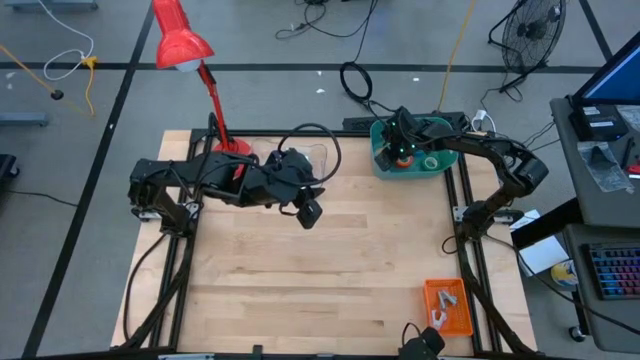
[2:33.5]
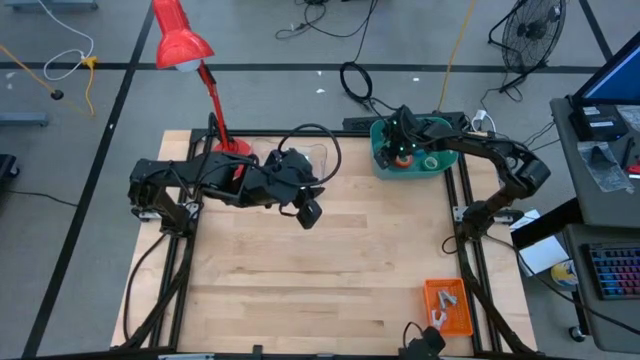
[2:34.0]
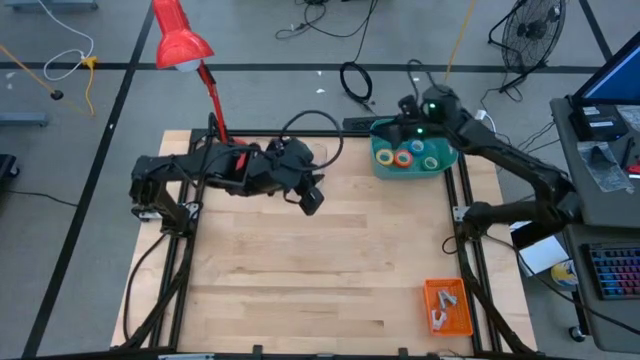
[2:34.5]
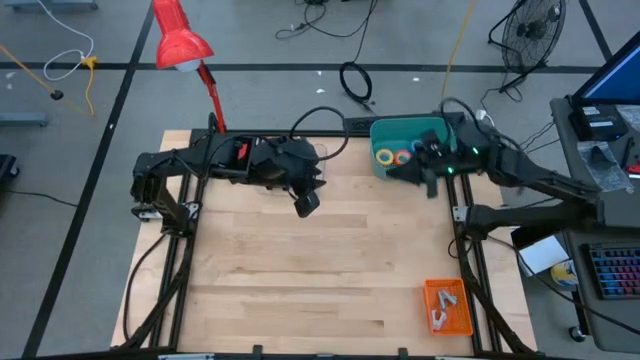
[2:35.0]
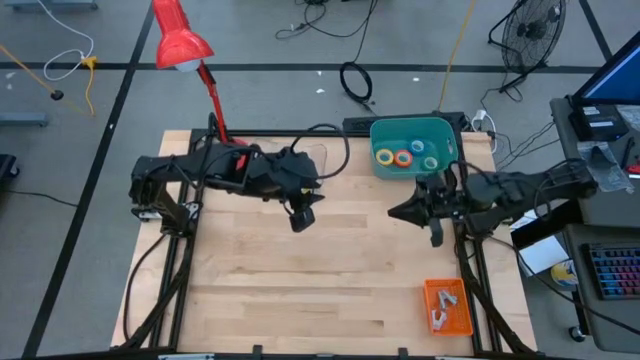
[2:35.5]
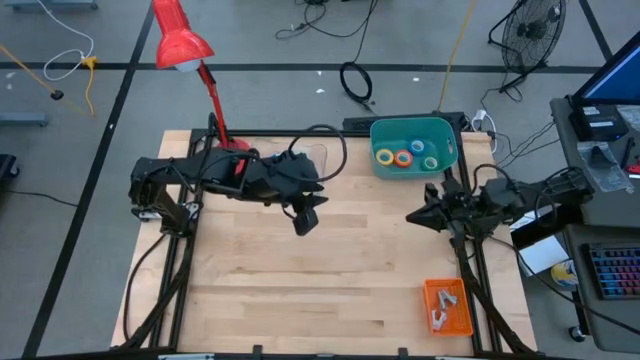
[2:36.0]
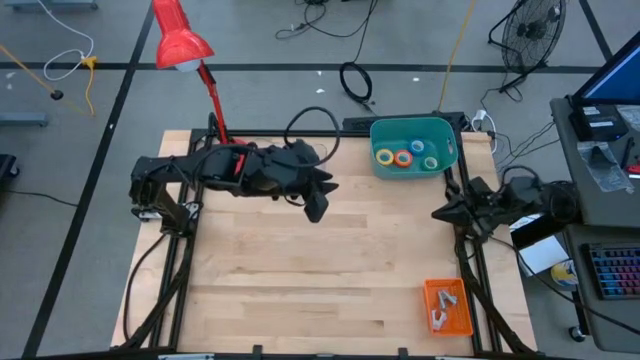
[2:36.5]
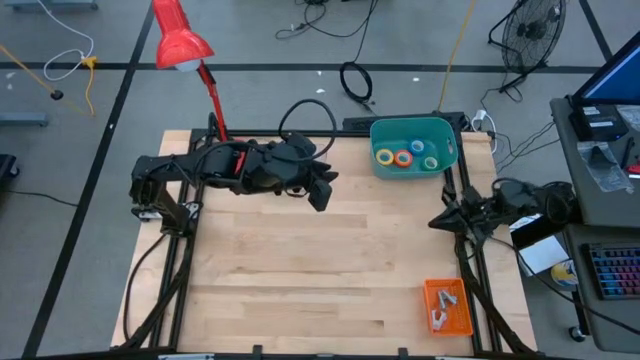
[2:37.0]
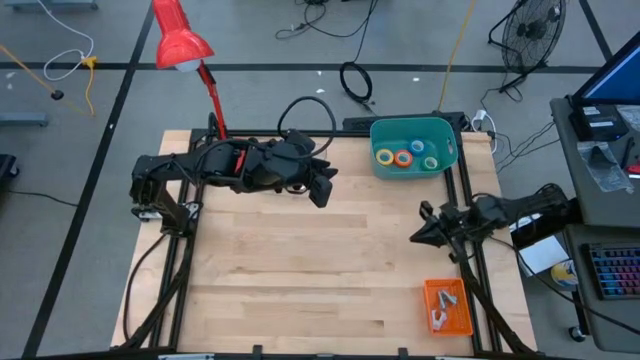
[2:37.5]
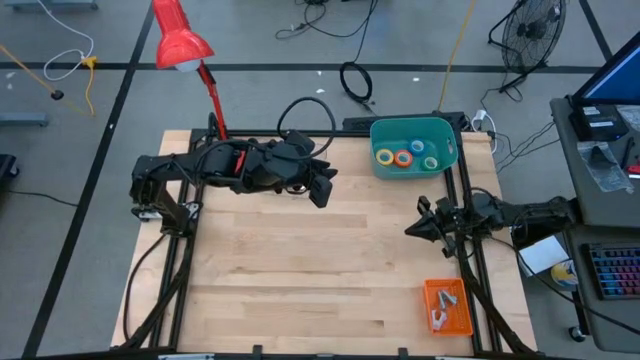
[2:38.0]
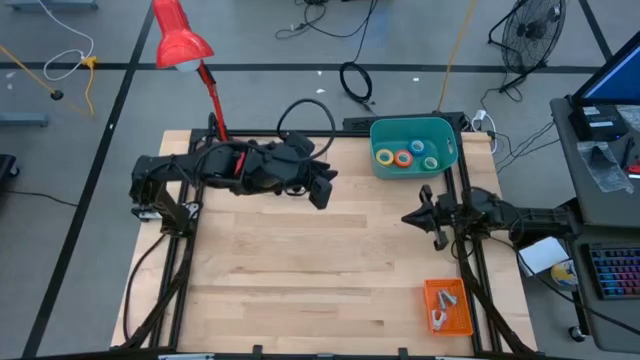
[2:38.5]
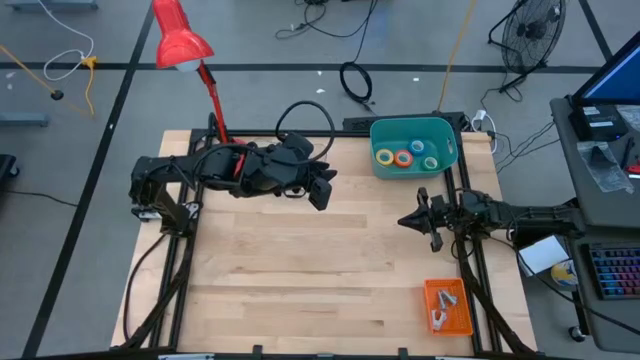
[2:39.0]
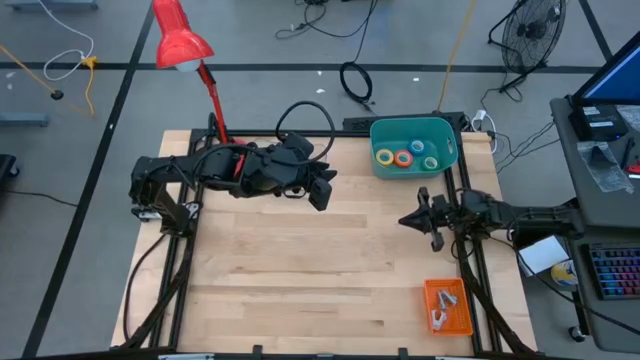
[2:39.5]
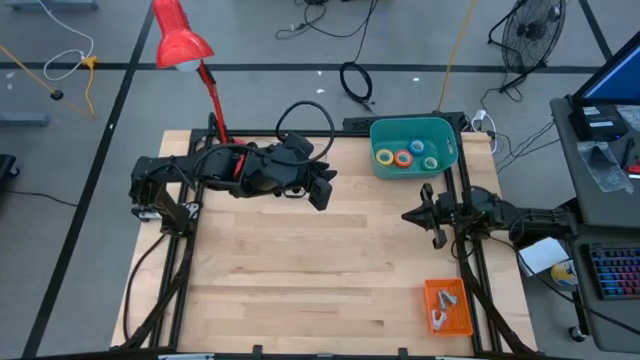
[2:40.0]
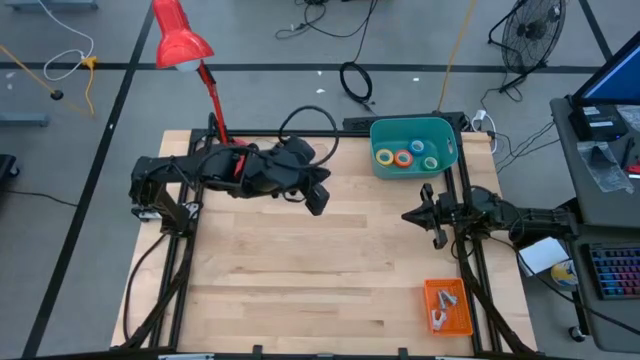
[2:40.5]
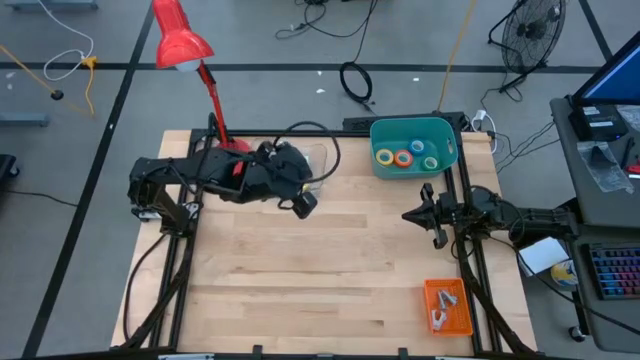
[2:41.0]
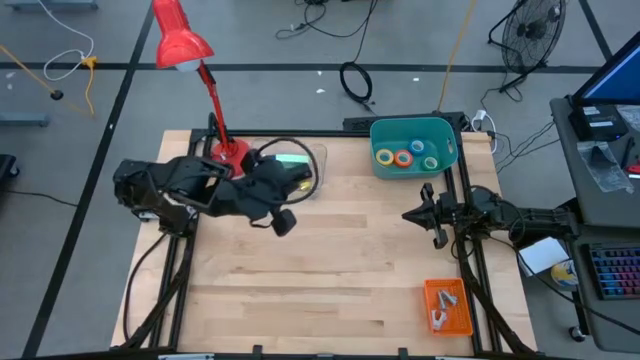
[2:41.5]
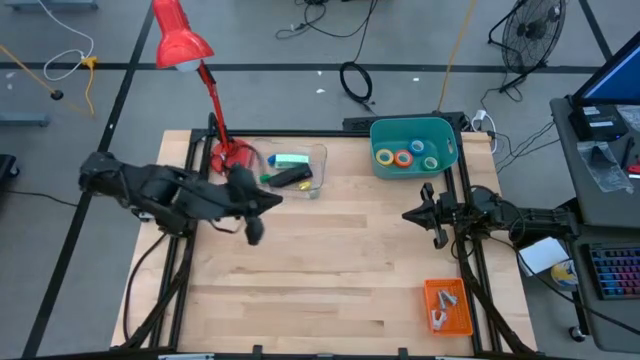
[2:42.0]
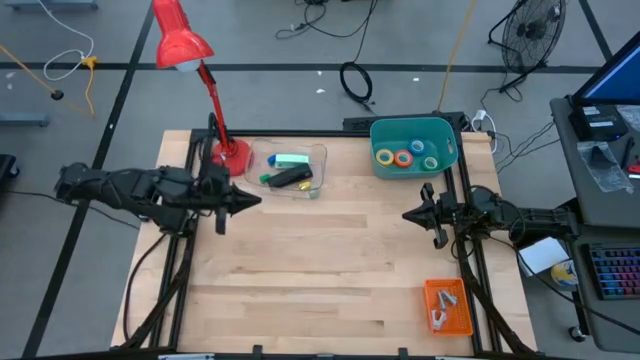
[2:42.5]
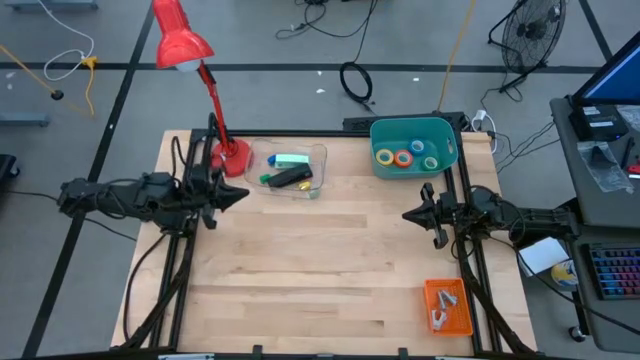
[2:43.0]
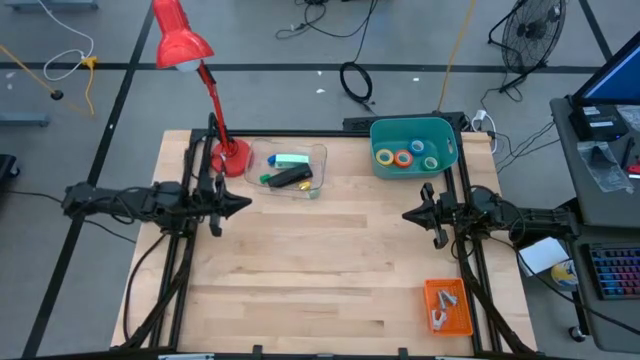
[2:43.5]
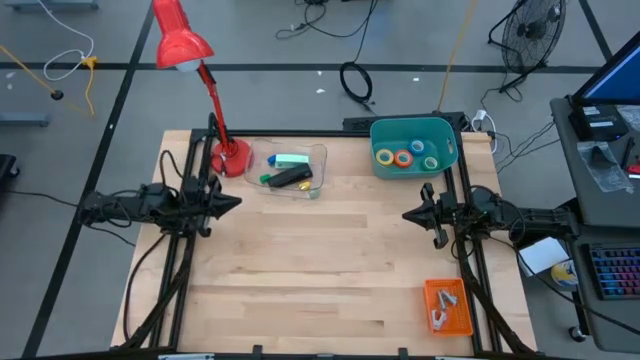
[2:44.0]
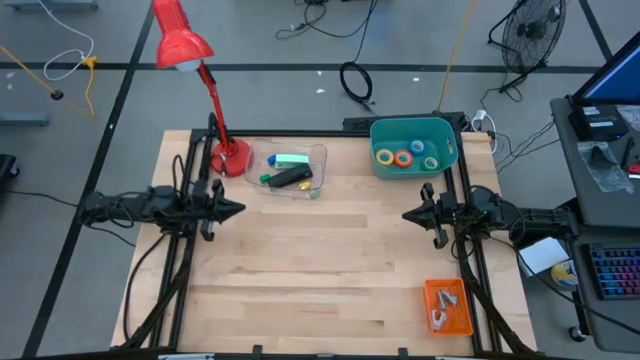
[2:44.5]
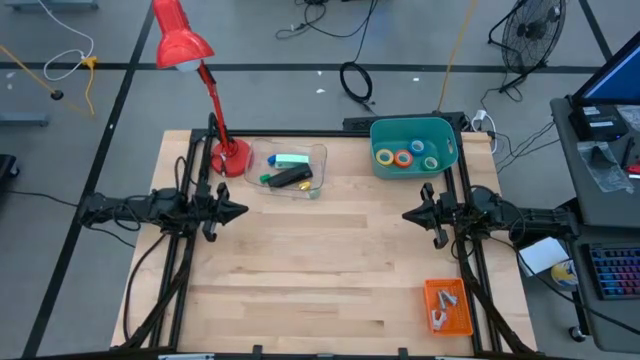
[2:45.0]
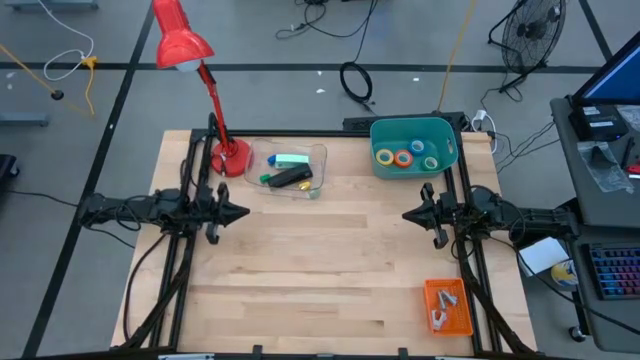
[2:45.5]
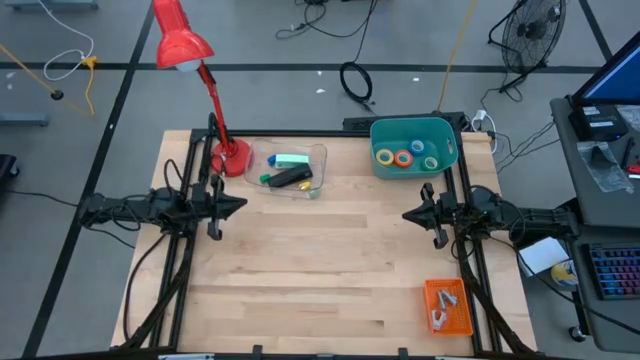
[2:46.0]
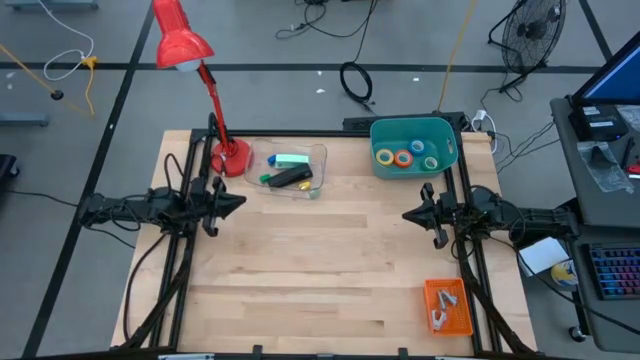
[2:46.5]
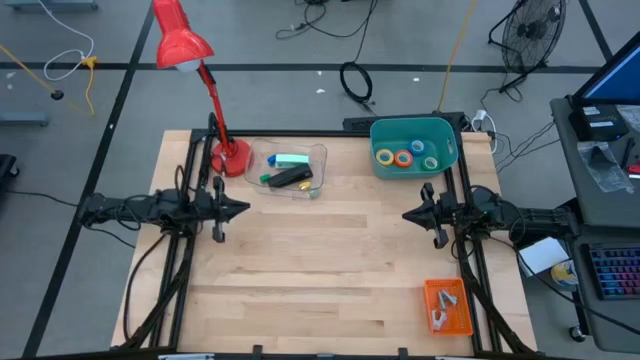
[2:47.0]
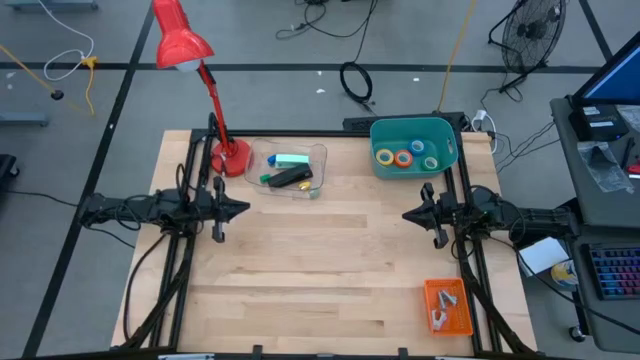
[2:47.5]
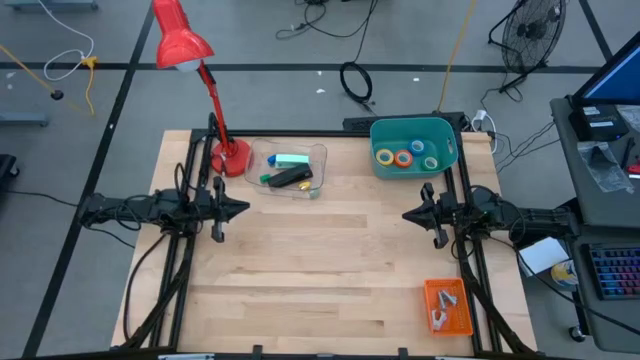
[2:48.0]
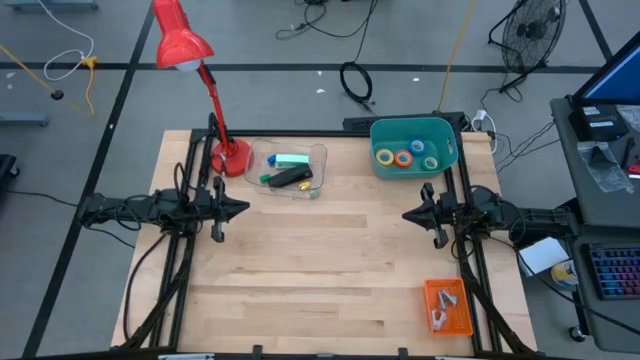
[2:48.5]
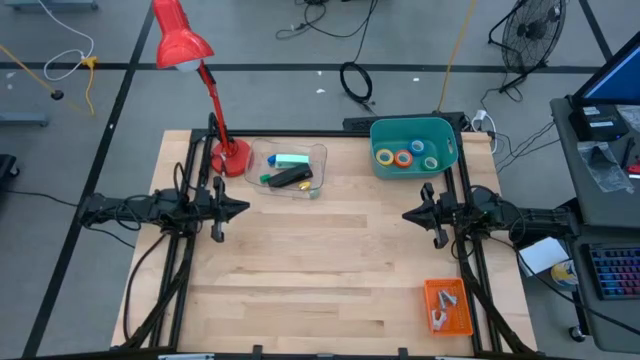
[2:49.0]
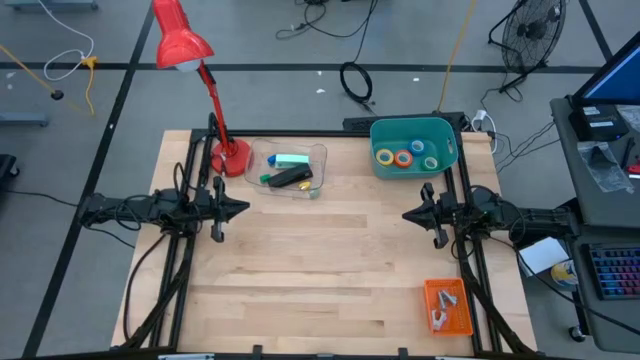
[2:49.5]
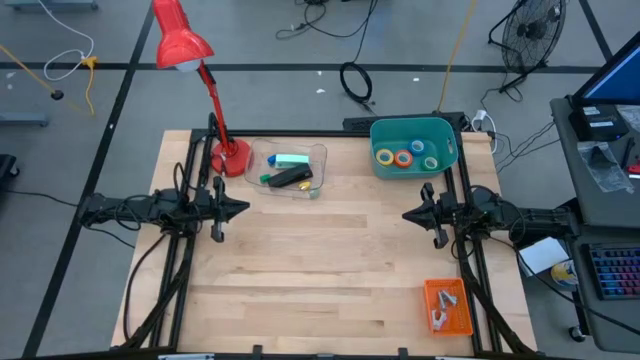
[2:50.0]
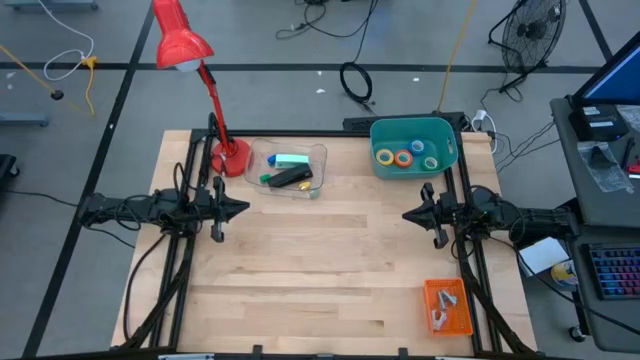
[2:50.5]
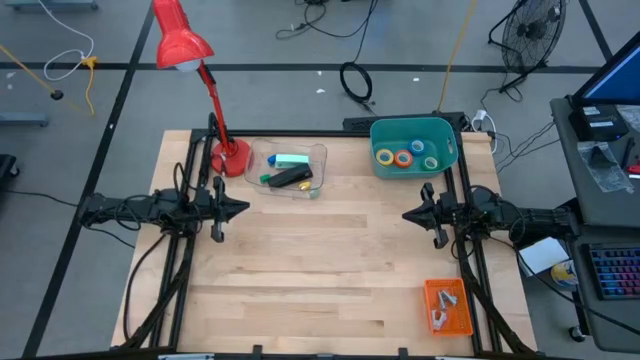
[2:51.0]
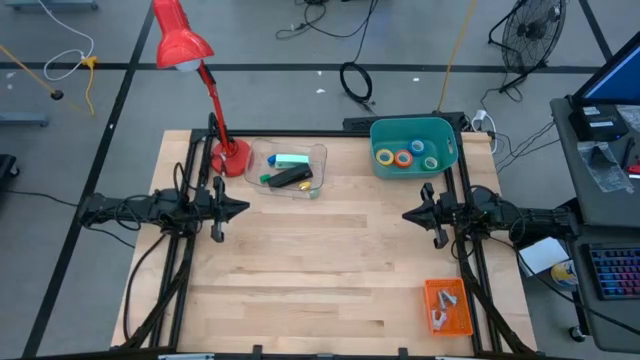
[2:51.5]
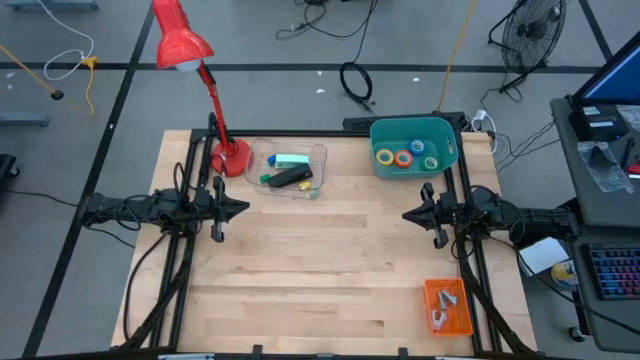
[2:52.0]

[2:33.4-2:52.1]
Task: Pick and place Stapler, Stapler remover, tape
Return to Home Position

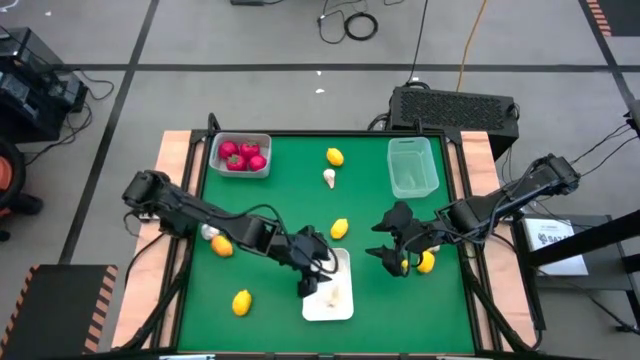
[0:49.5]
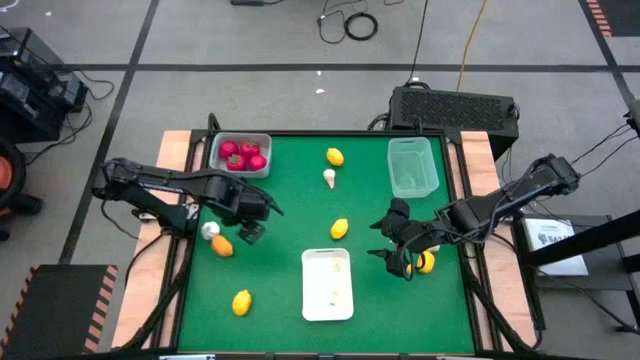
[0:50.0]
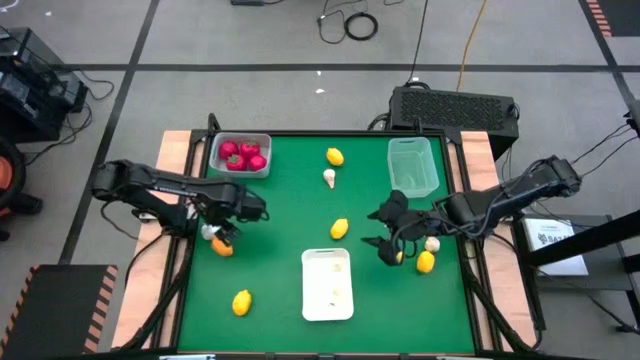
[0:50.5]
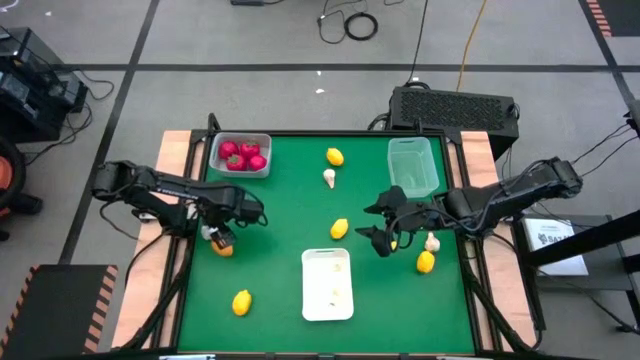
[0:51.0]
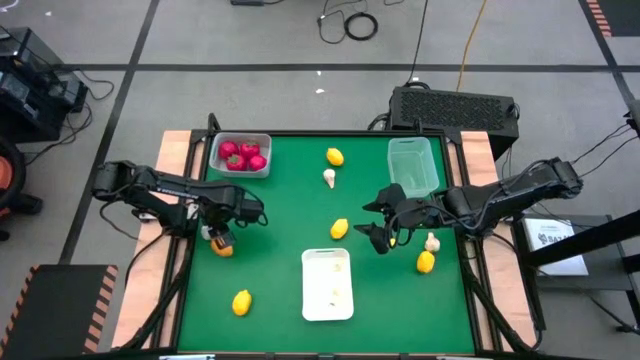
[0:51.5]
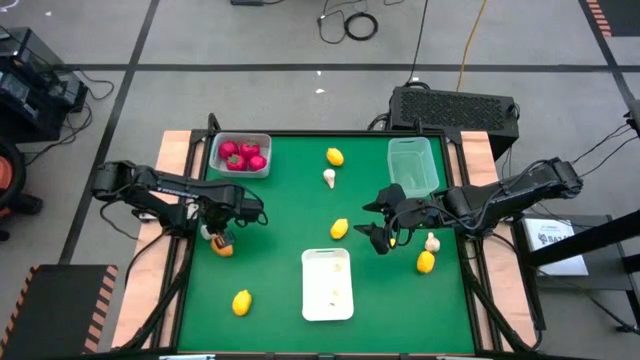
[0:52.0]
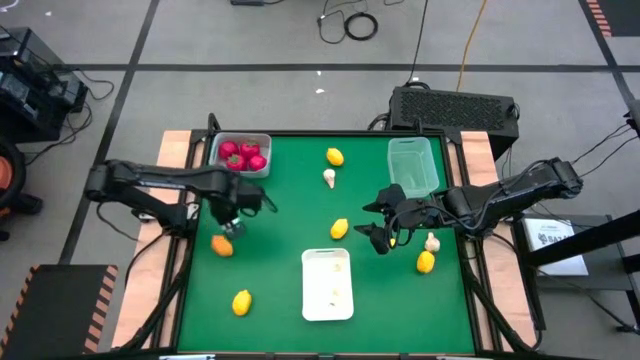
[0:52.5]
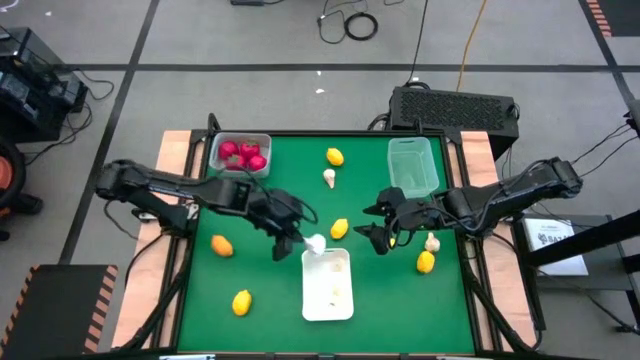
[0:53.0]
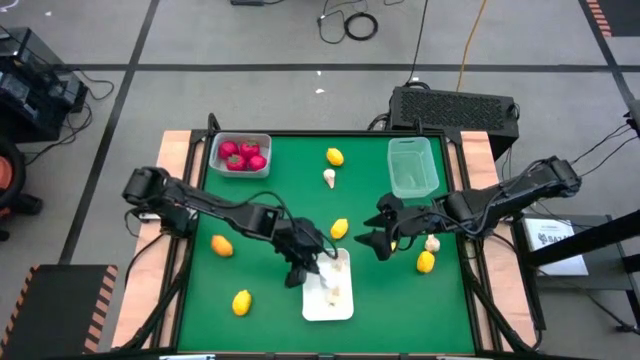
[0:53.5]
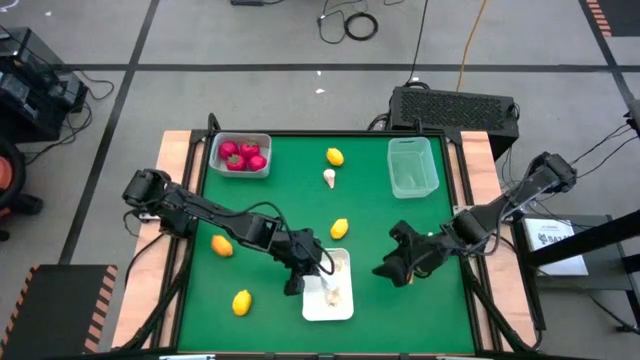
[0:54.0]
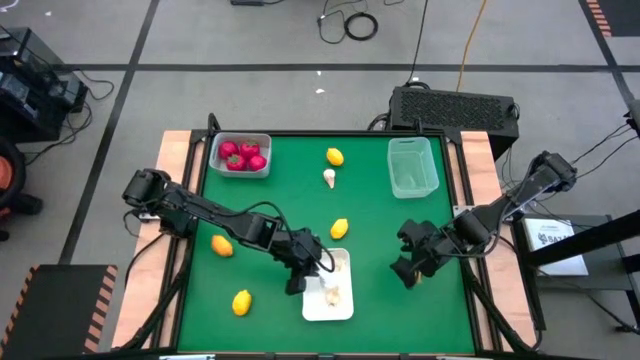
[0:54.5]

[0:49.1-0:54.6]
Task: Sort produce into baskets
Put the middle left garlic into the white bin
